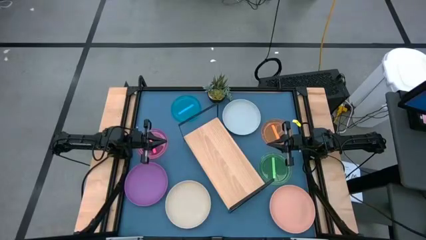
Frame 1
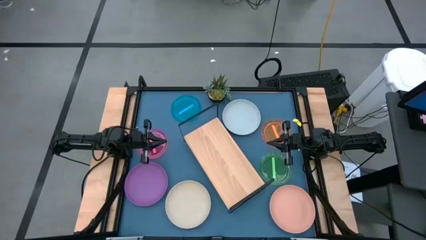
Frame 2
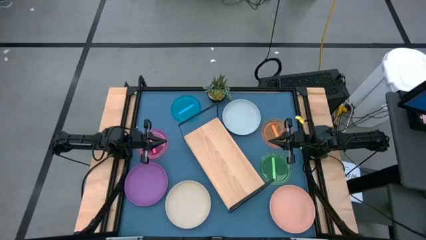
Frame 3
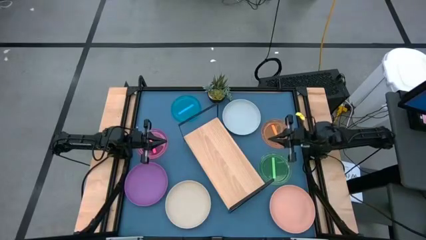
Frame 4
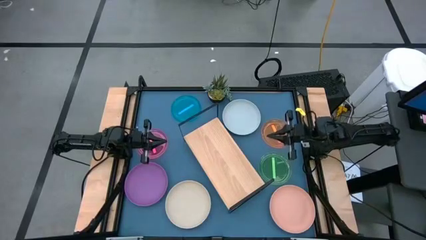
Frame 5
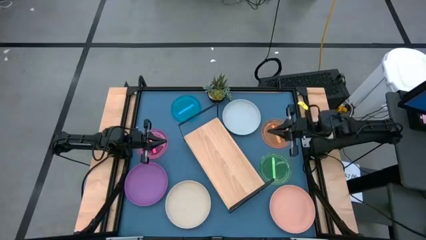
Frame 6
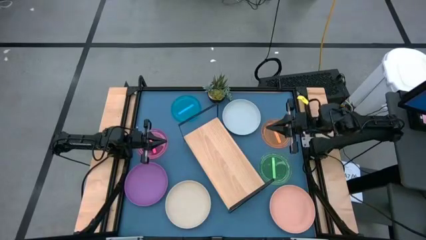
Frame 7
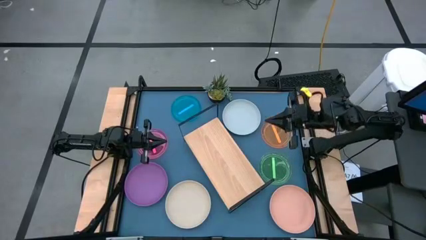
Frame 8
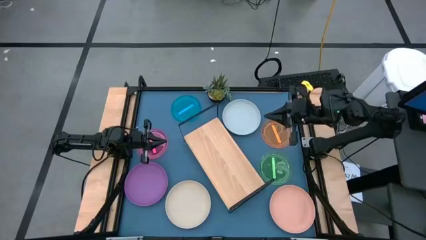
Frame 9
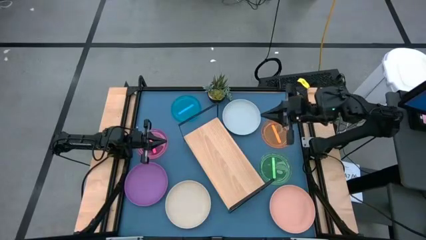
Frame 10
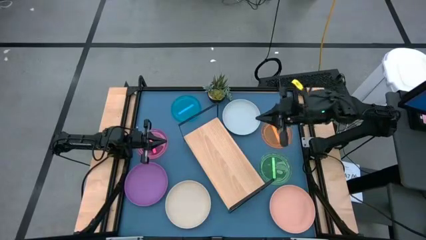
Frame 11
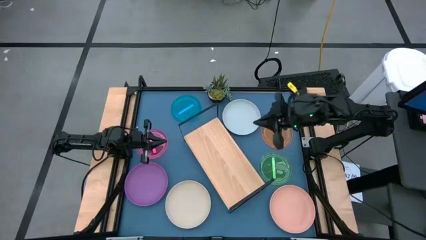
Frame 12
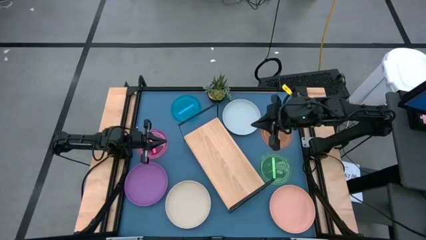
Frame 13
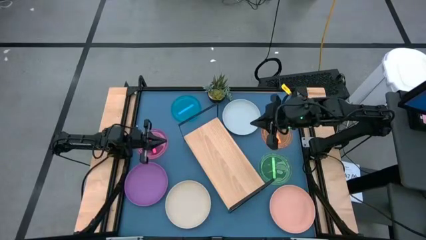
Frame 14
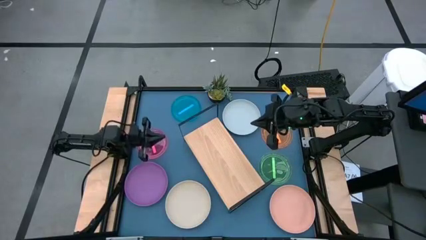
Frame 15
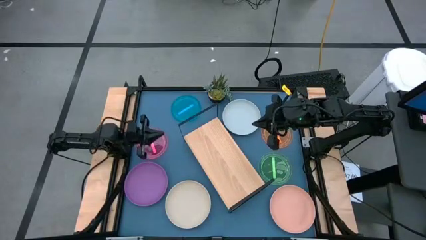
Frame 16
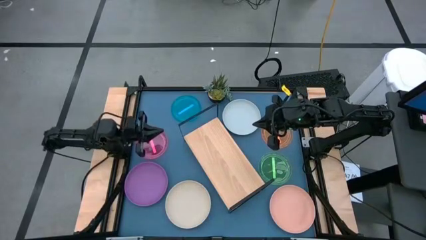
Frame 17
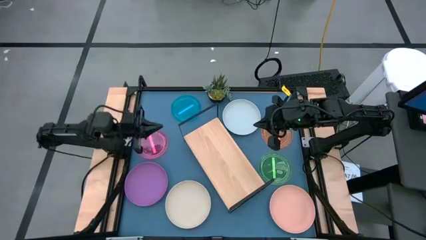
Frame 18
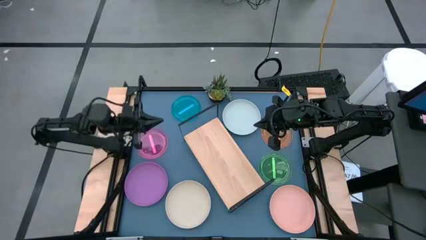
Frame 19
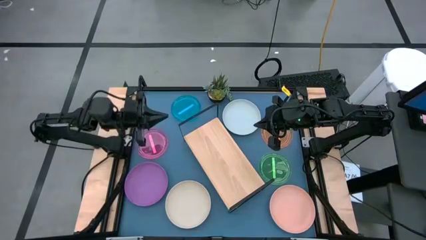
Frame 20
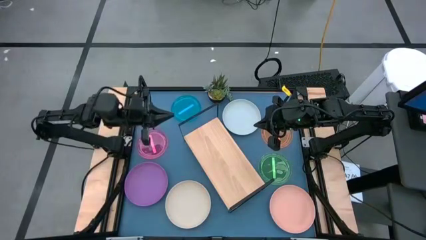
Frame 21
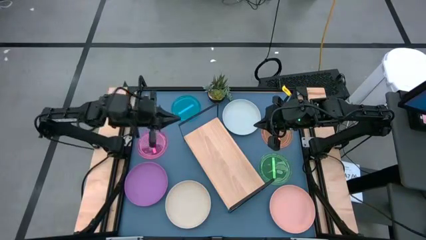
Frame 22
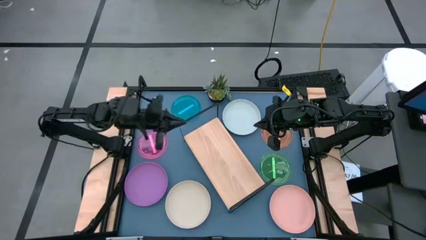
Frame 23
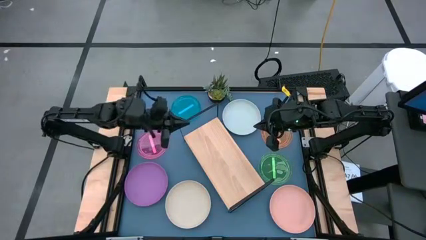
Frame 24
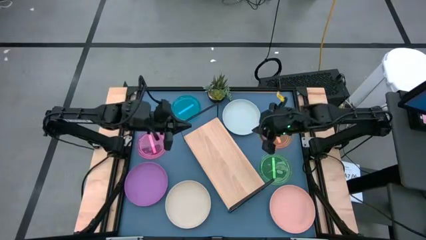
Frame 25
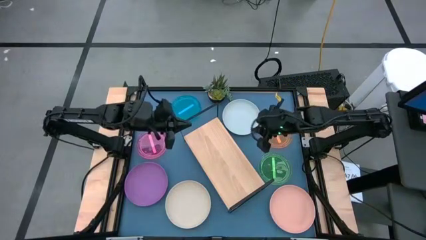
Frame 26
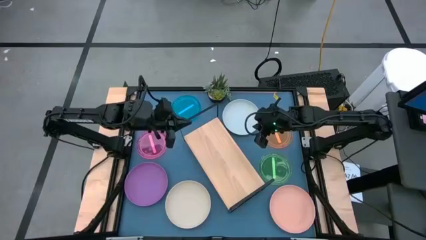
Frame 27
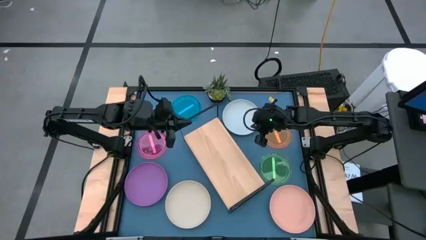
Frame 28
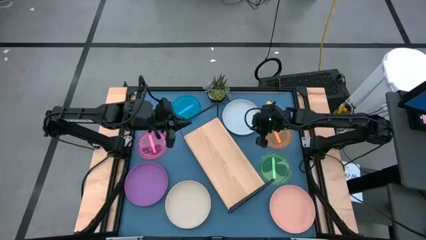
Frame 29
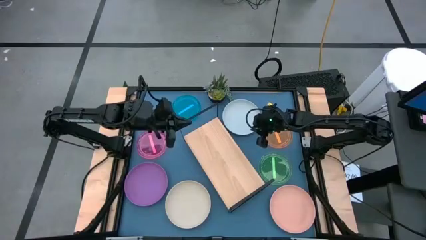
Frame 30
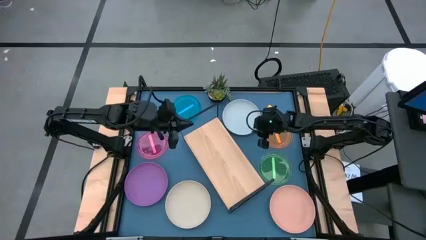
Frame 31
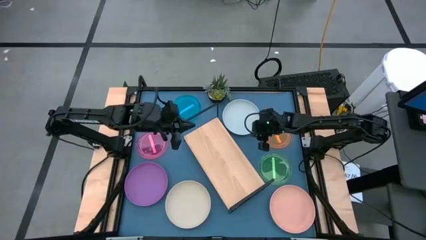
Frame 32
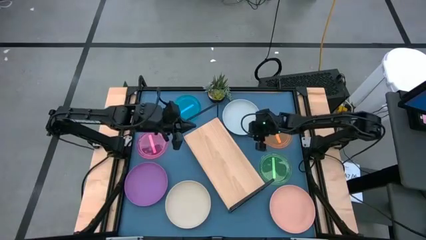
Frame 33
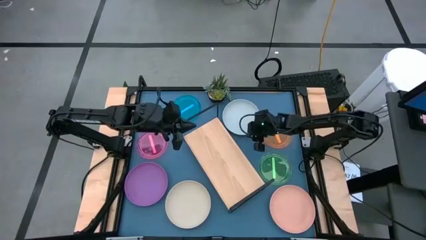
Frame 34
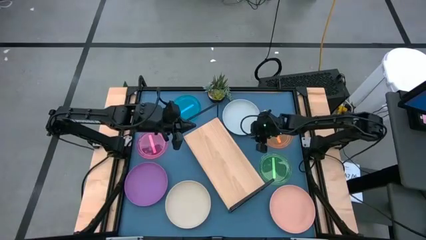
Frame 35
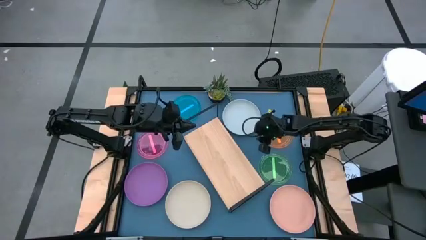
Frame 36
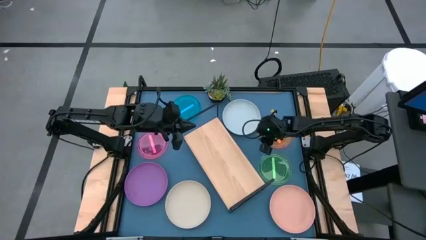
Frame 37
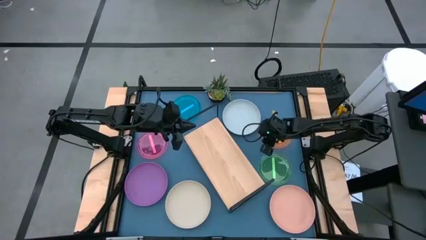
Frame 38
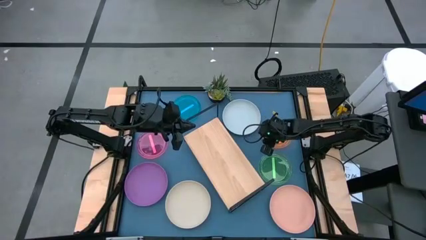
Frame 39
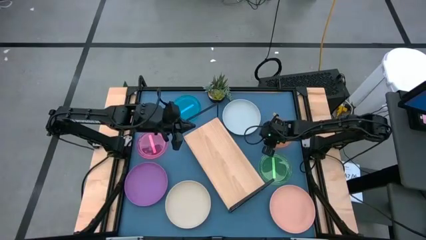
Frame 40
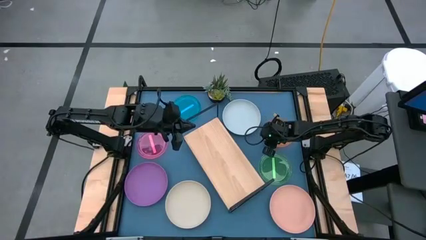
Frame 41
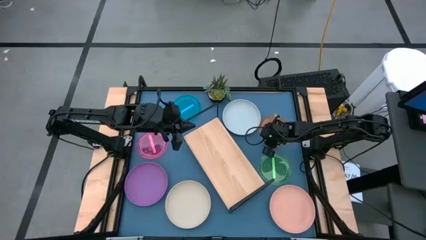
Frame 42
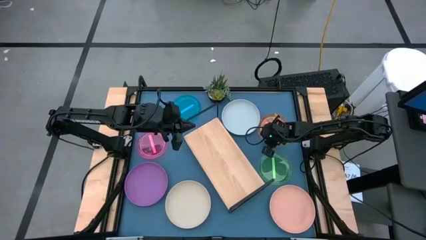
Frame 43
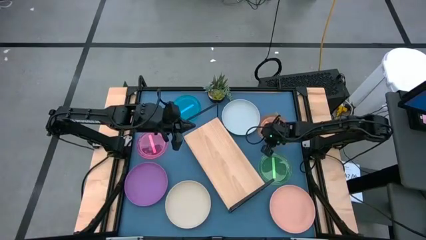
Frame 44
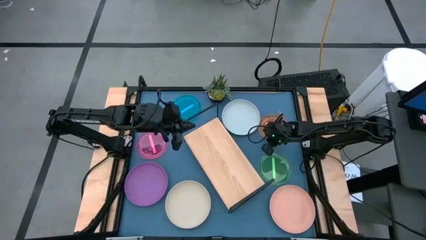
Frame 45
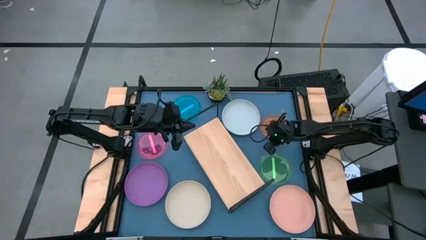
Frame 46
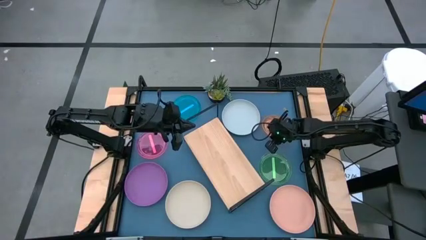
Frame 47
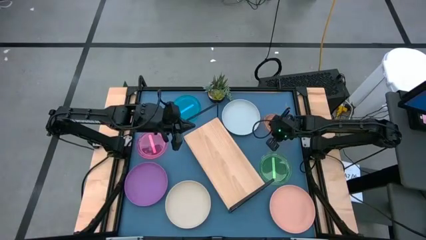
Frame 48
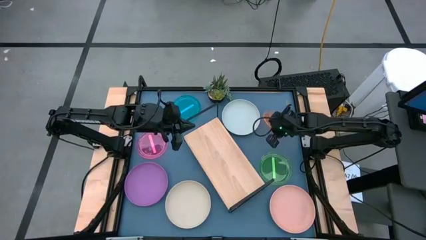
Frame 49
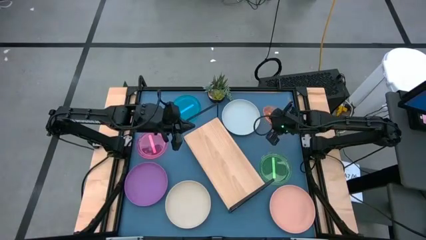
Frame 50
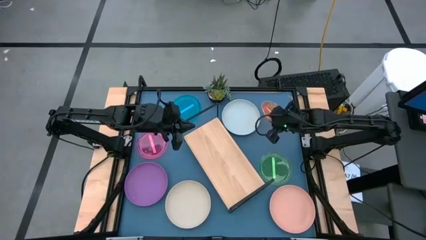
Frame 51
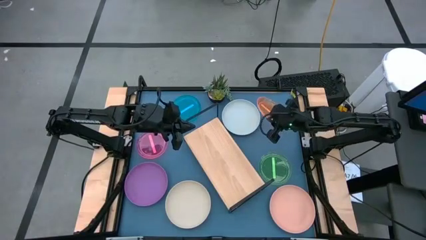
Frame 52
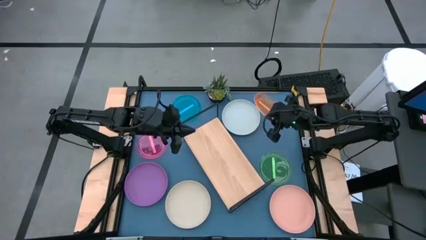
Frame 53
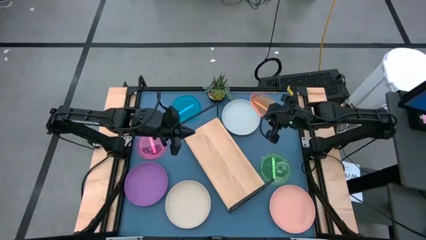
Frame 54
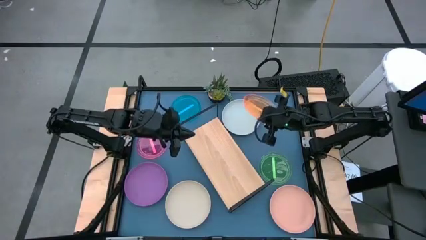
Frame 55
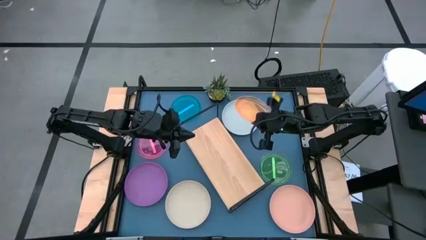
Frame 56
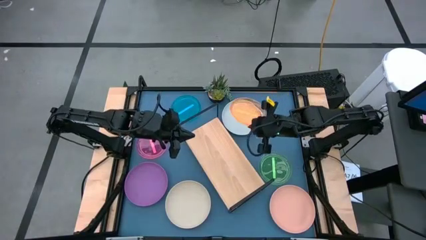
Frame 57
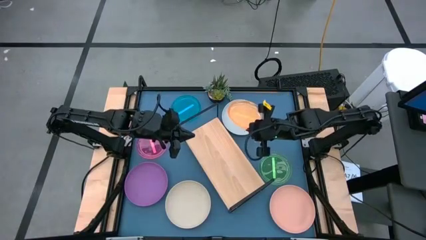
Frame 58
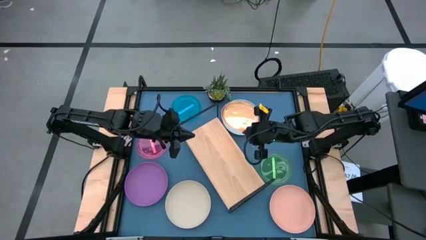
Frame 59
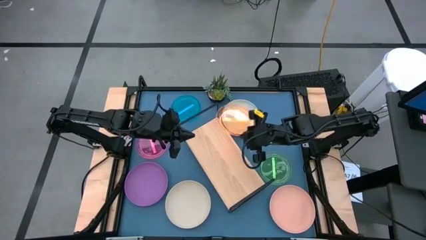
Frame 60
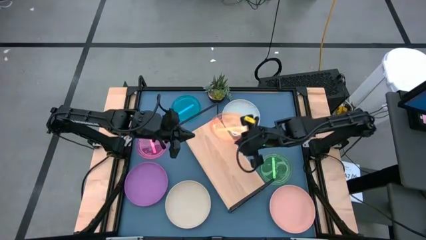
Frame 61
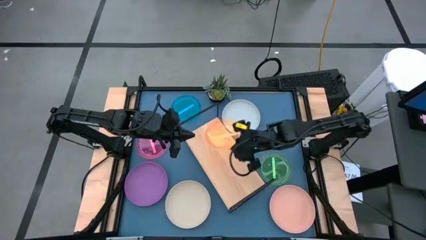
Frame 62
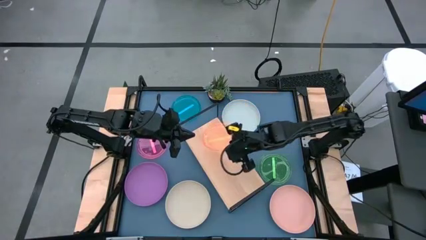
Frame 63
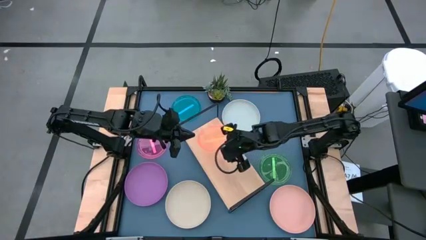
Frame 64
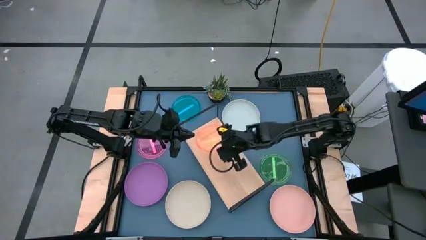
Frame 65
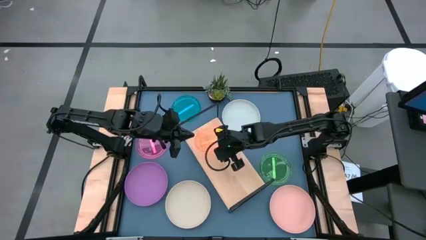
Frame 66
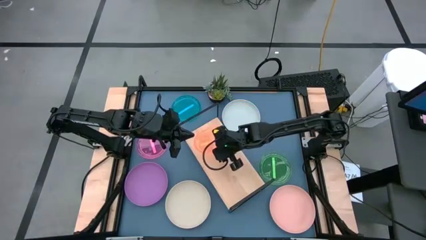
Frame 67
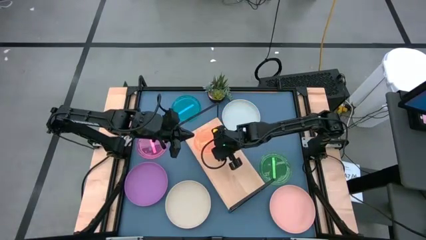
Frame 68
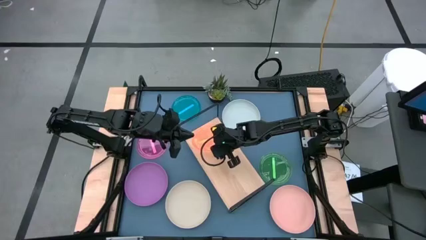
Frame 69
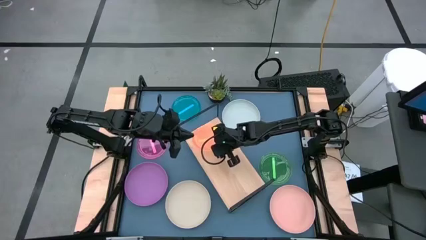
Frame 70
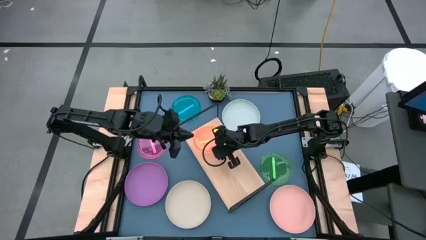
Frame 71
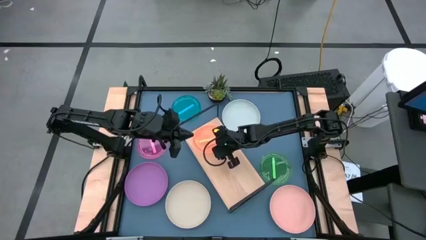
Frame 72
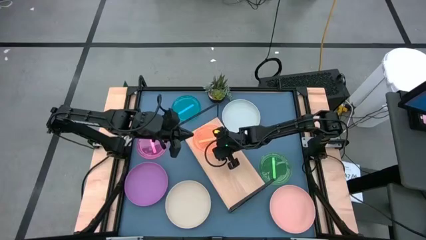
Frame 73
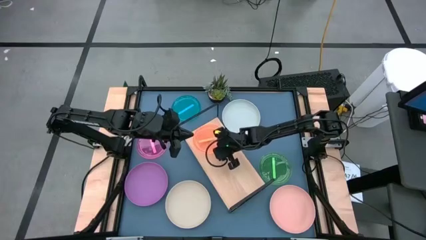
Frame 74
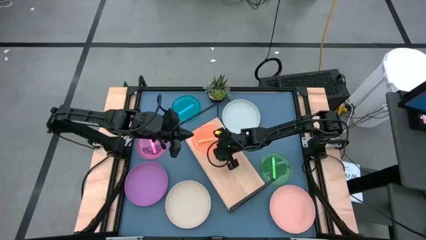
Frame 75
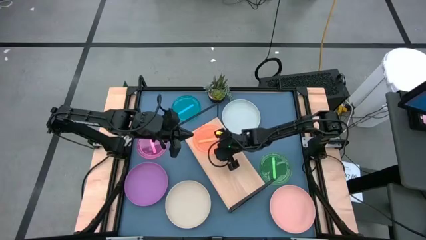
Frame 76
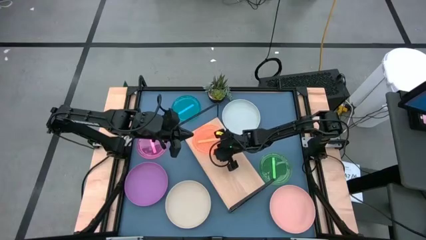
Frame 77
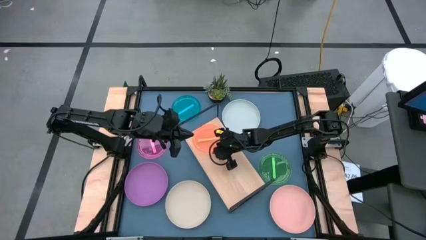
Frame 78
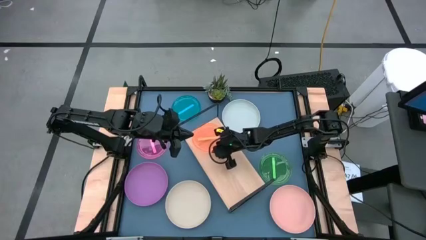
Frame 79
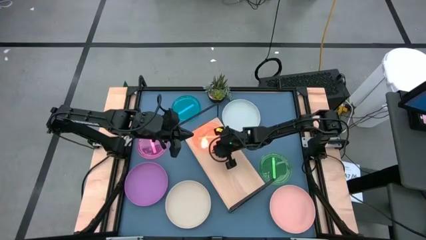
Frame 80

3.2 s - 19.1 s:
Task: Place and stack plates onto a shelf
Put the small orange plate on the shelf
